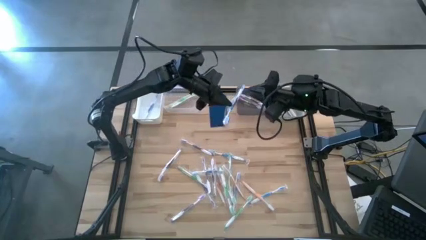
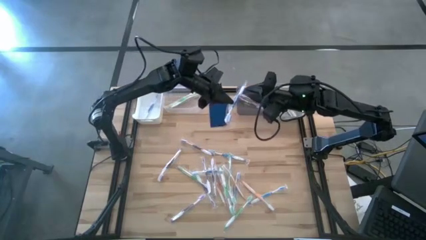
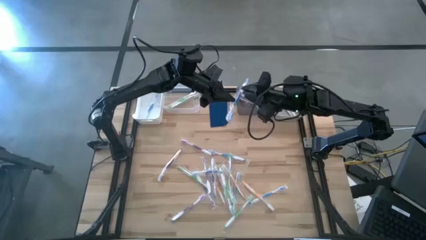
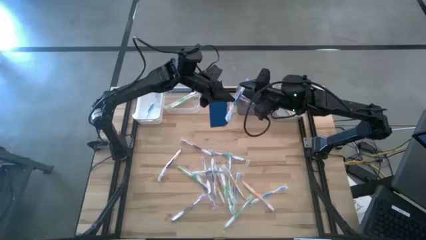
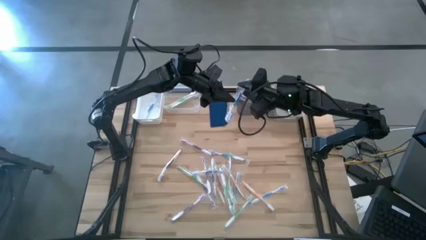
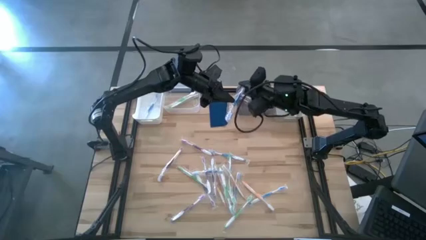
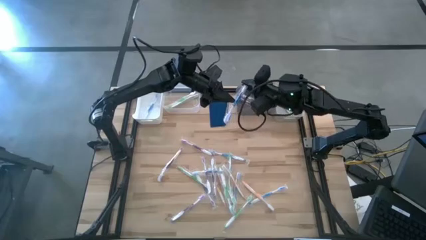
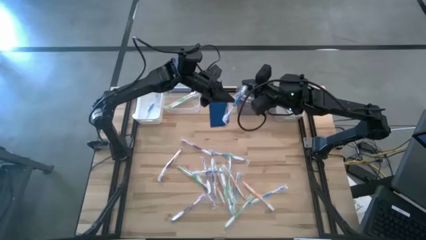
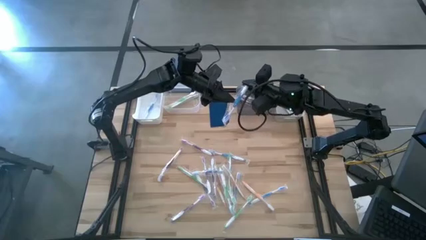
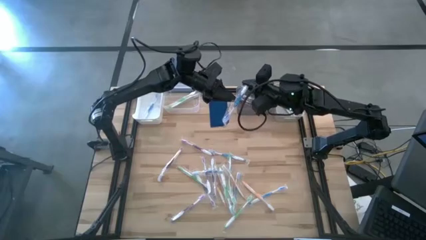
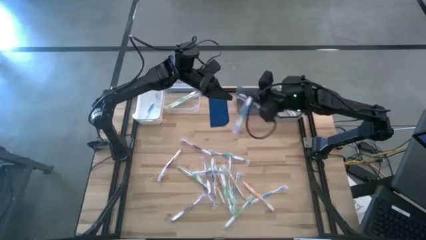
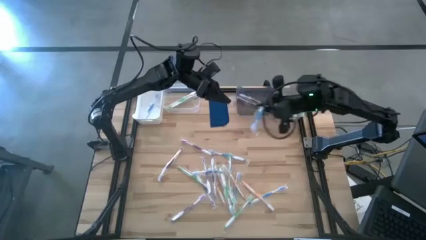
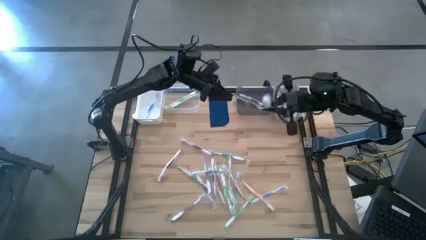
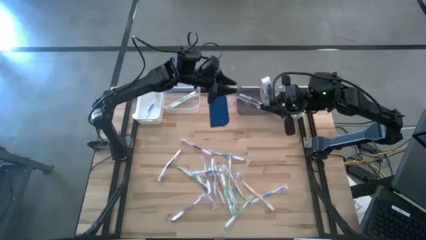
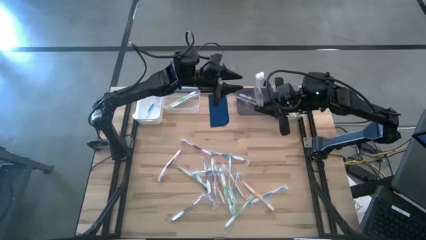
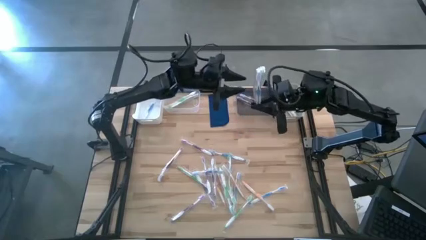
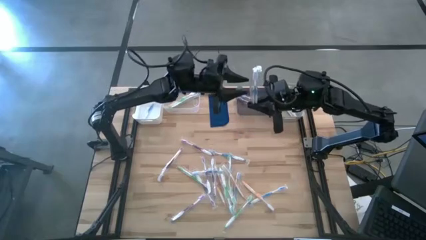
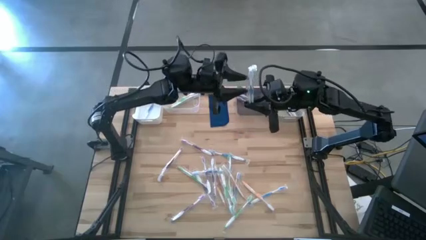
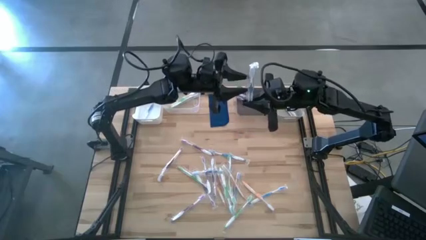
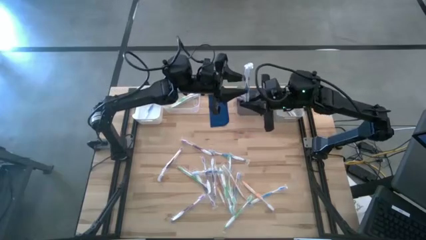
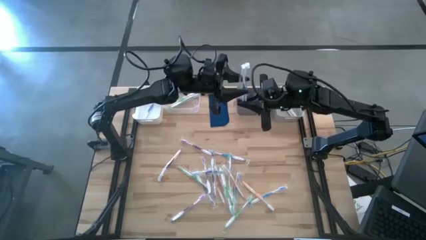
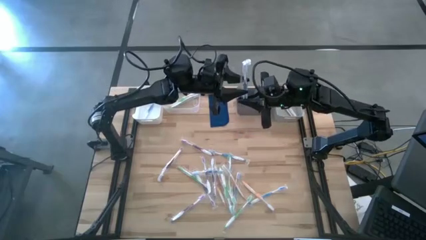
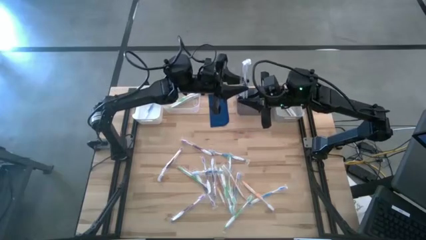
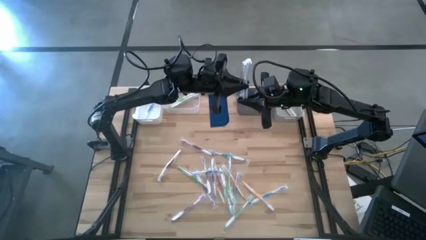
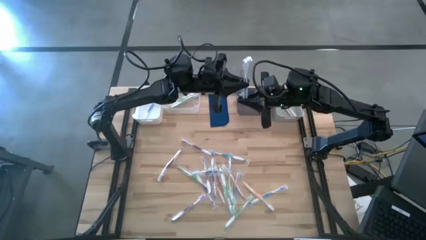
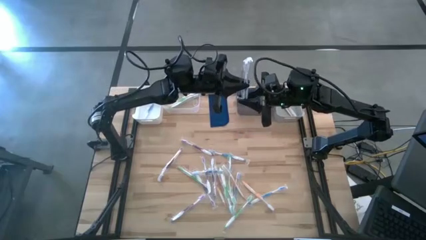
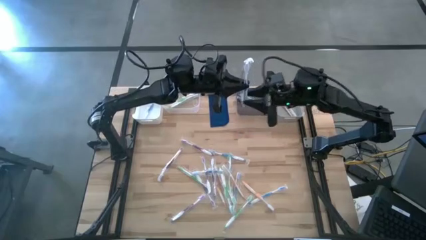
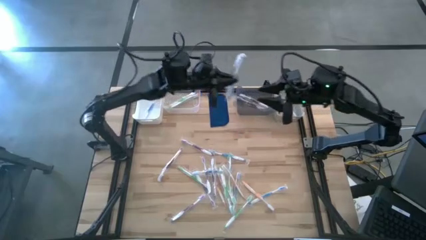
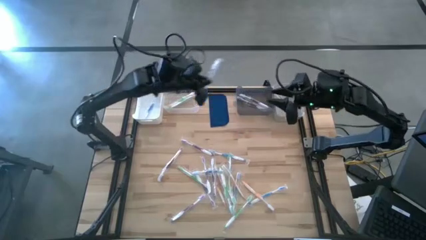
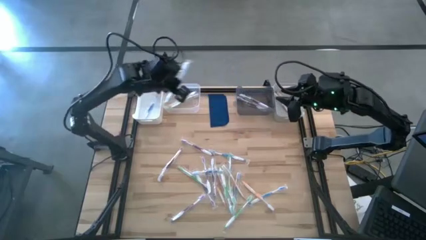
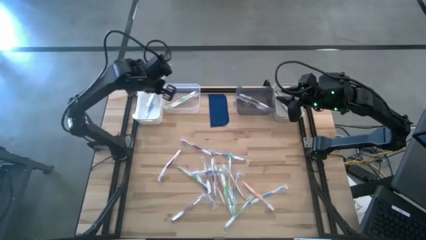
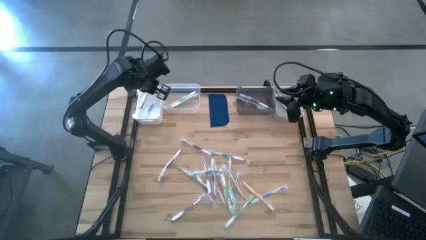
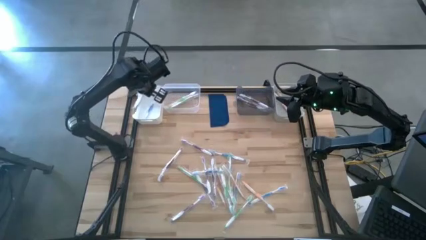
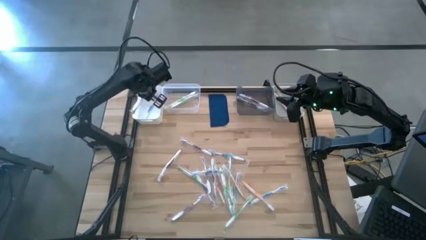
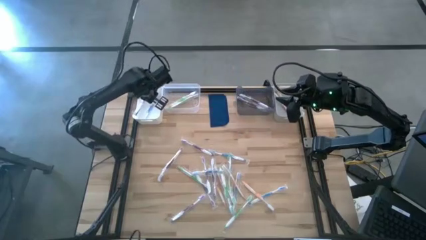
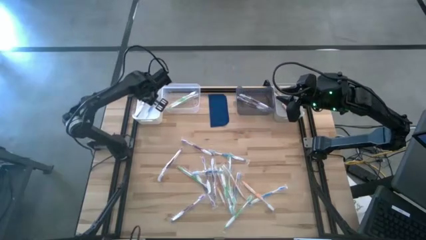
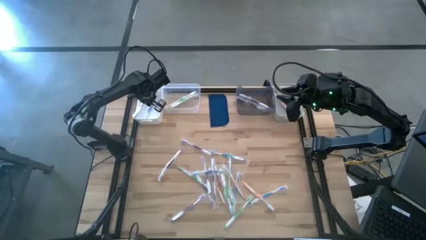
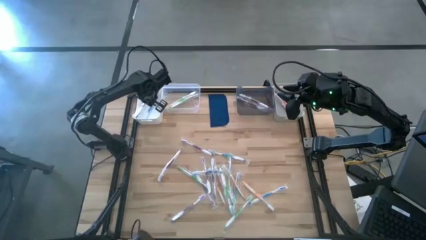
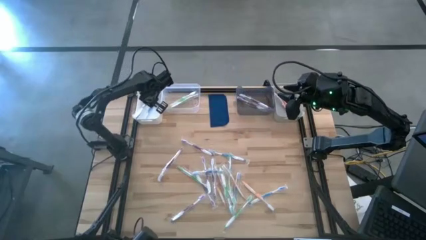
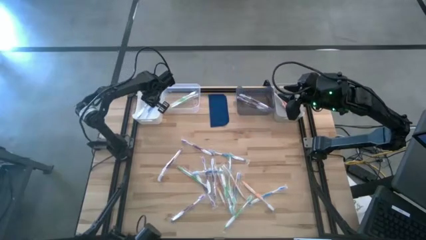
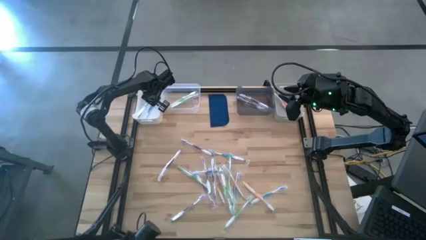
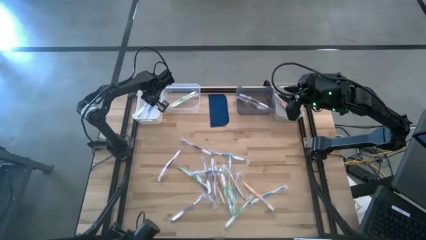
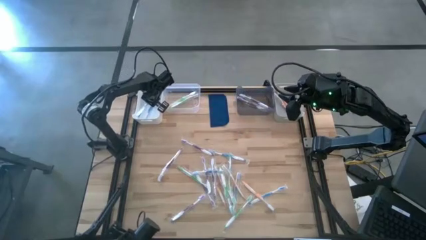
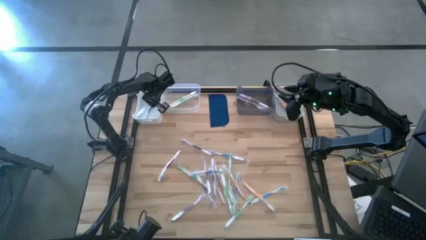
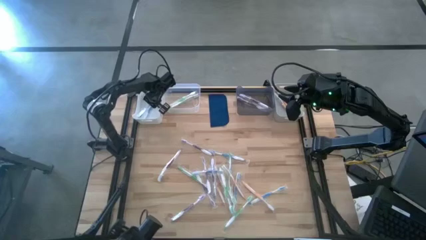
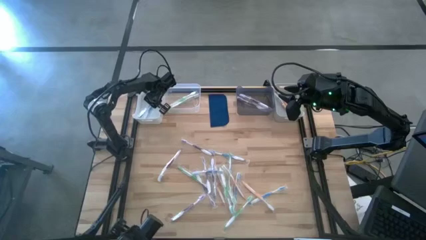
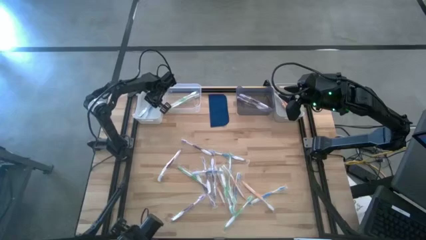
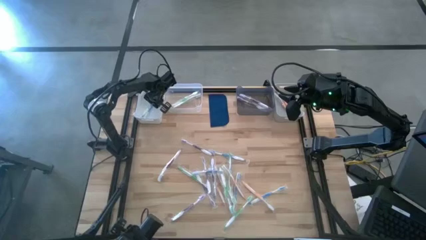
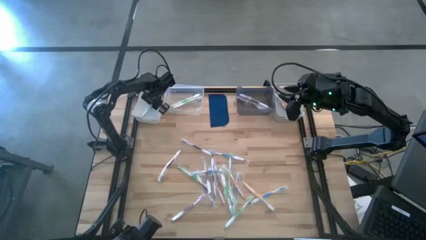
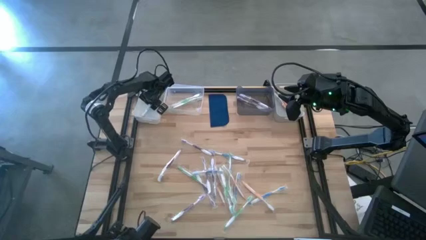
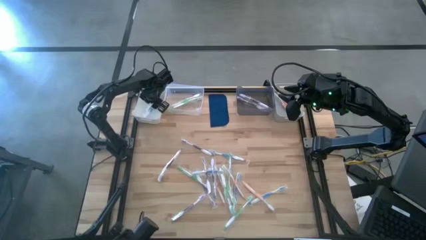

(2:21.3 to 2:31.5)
Task: Pick & Place Toothbrushes
Put the blue toothbrush into the white bin

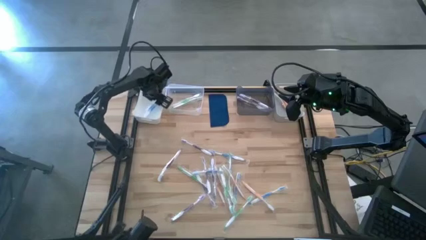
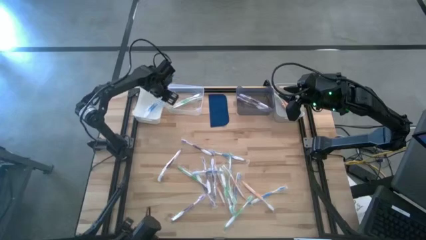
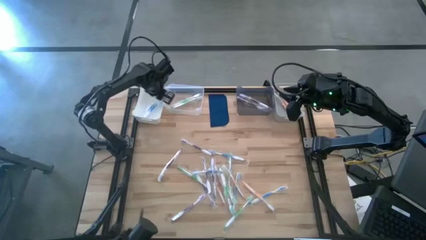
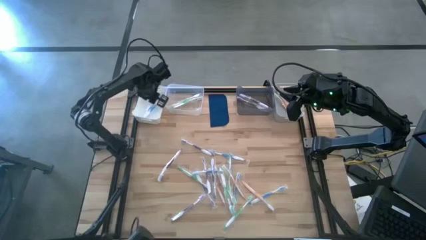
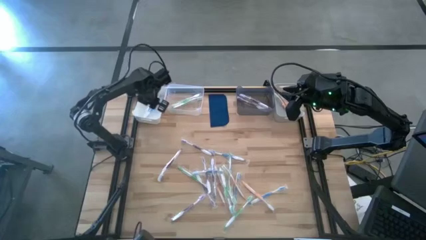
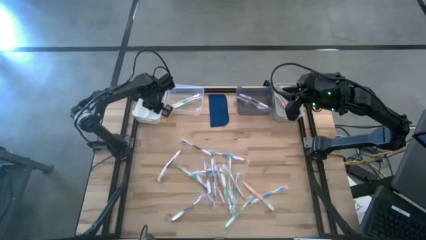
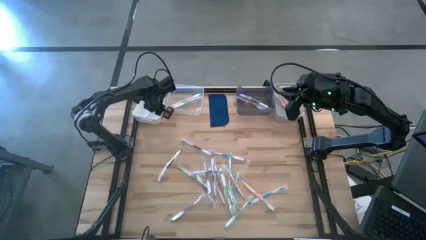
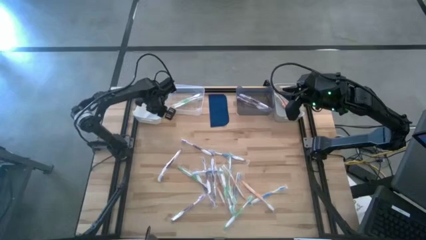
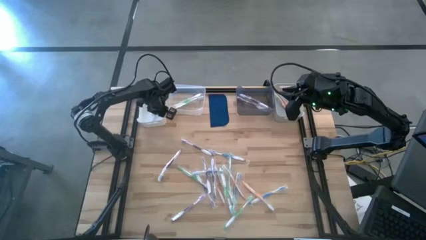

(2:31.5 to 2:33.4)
Adjust the white bin on the table

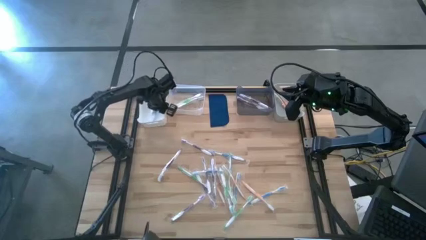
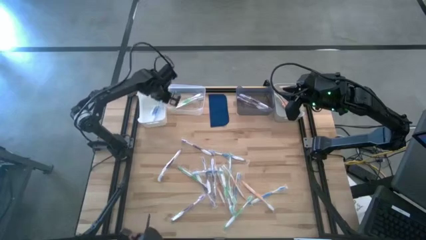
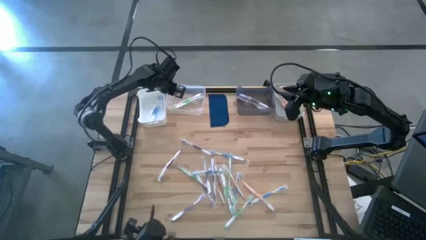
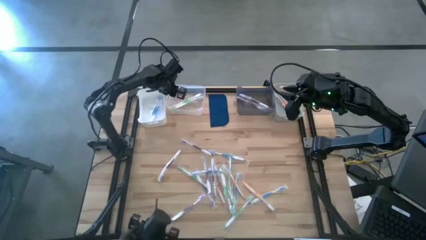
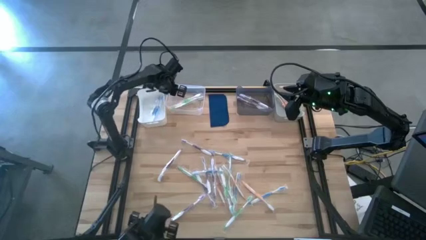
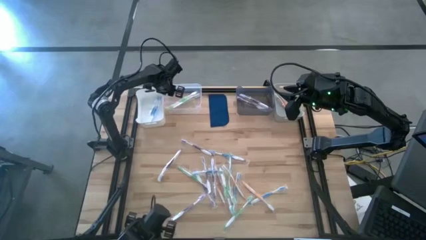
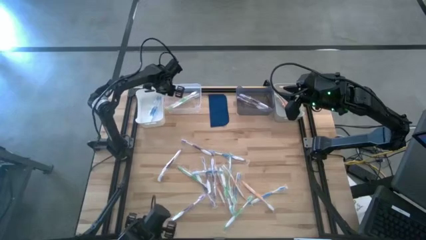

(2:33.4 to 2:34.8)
Adjust the transparent bin on the table

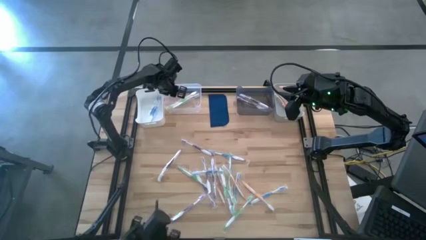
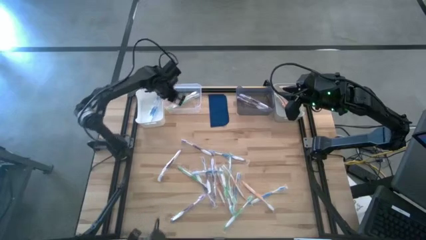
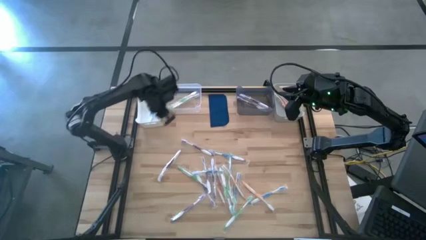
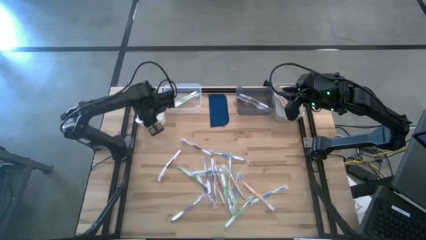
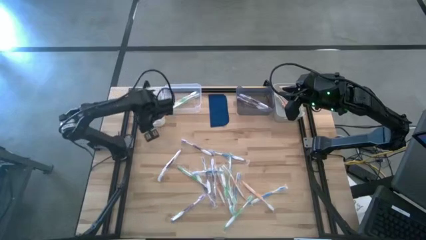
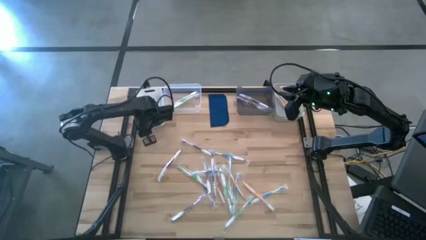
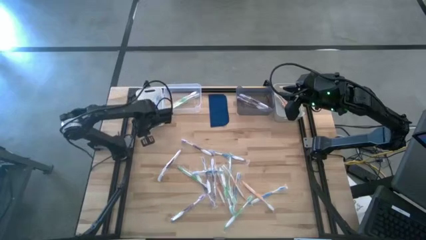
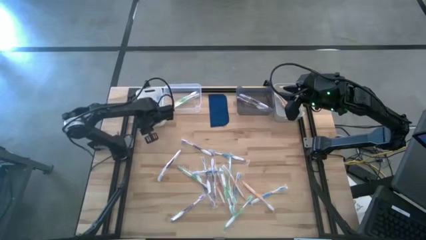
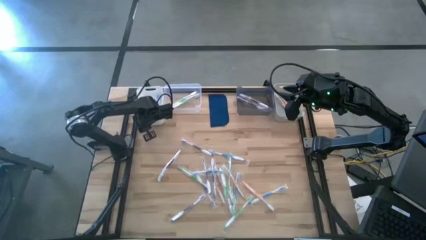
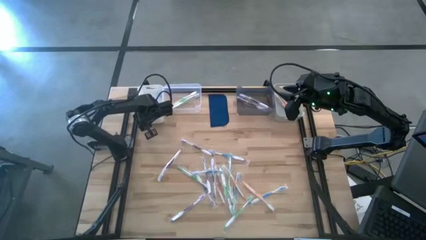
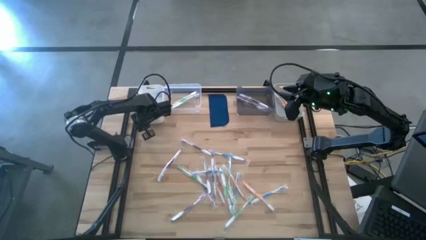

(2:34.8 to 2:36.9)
Adjust the white bin on the table

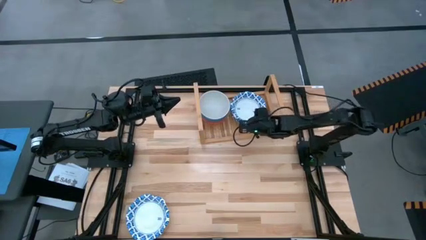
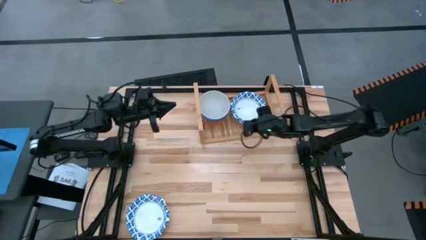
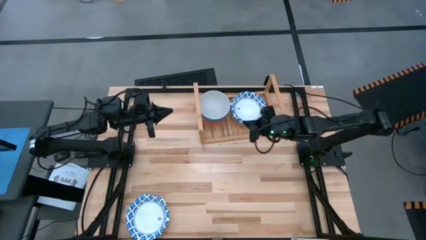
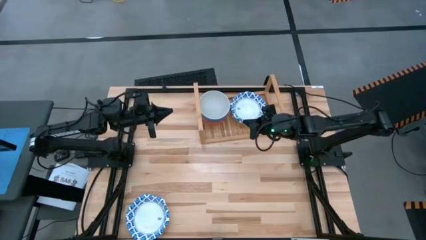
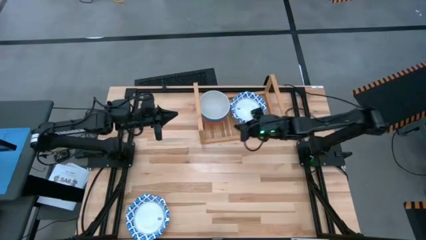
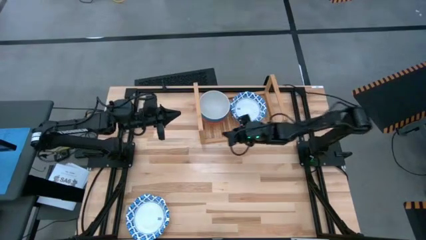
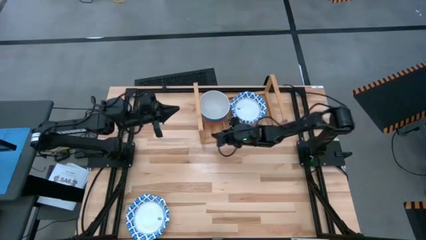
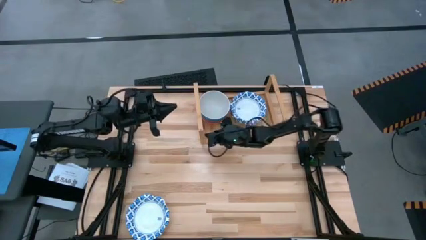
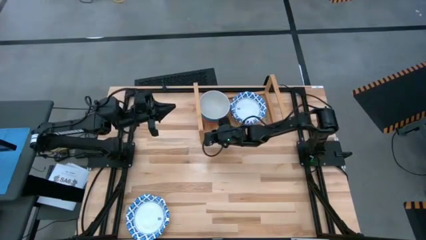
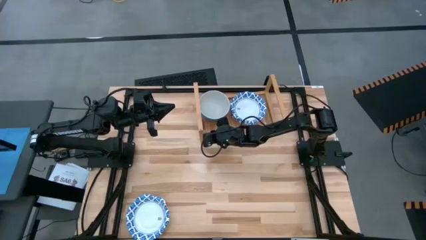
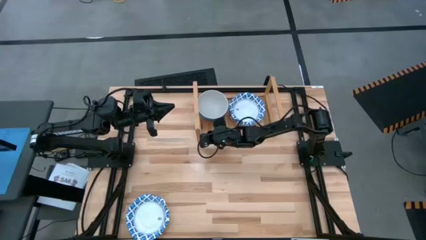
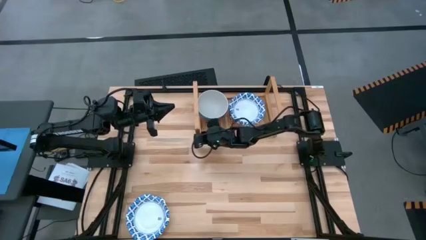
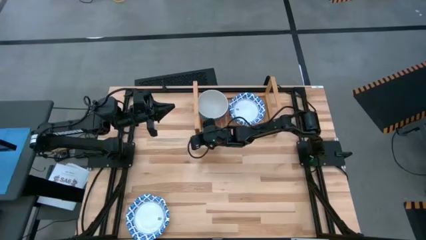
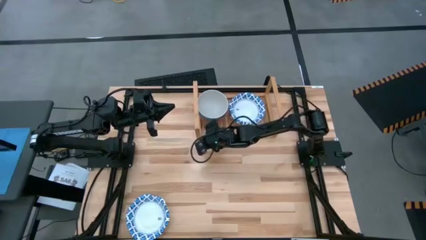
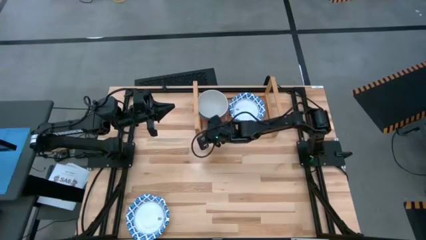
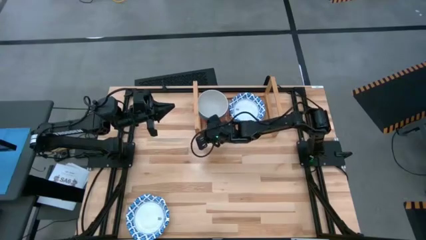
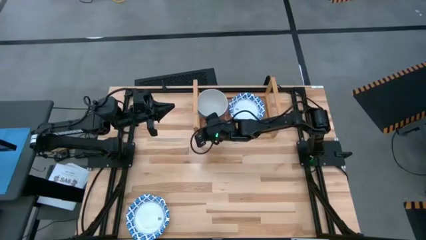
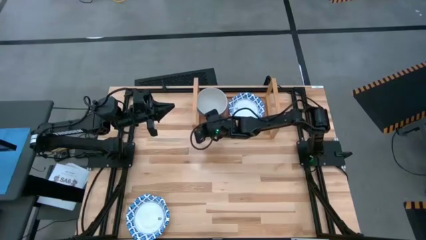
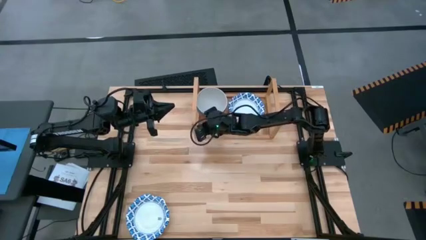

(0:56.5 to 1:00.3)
Task: Place and stack bowls onto a shelf
Adjust the shelf
